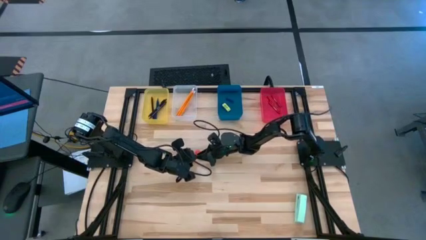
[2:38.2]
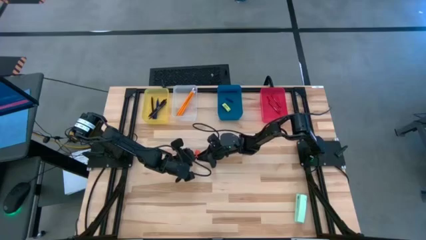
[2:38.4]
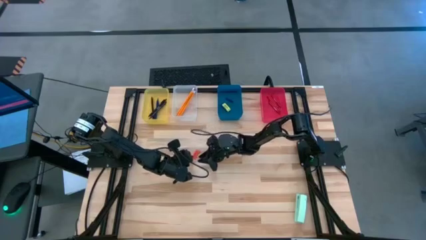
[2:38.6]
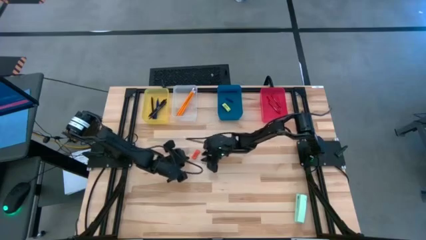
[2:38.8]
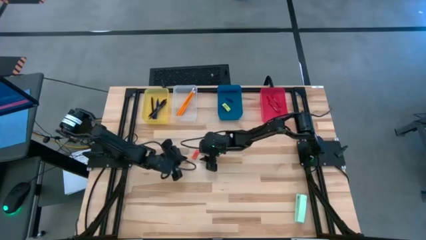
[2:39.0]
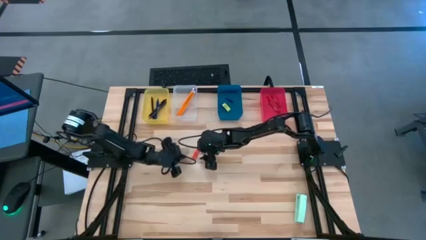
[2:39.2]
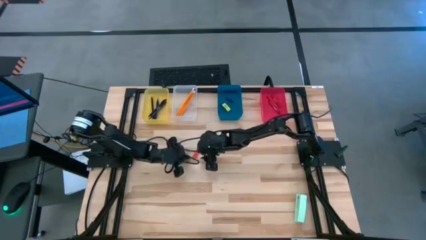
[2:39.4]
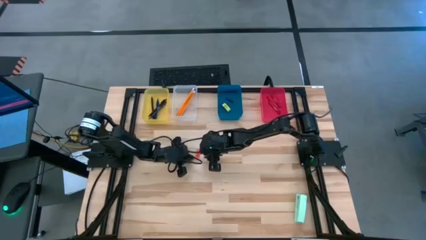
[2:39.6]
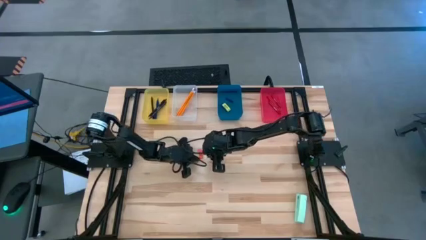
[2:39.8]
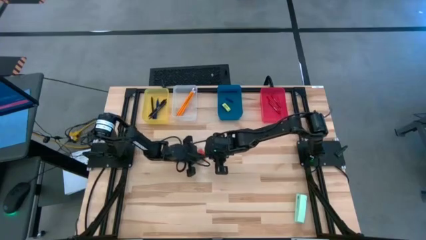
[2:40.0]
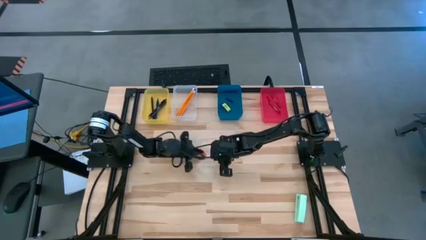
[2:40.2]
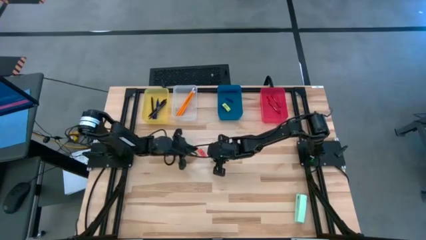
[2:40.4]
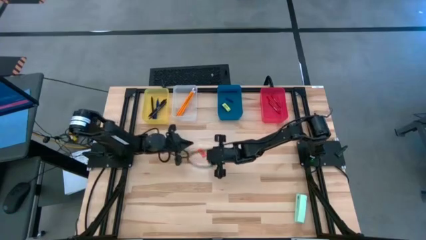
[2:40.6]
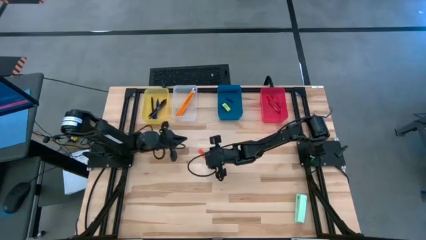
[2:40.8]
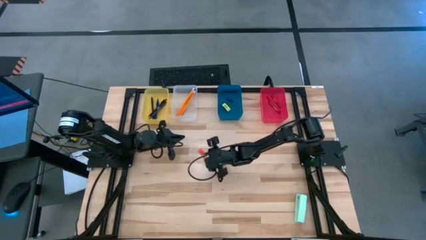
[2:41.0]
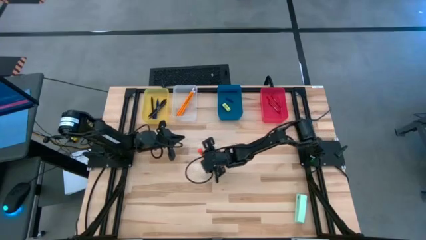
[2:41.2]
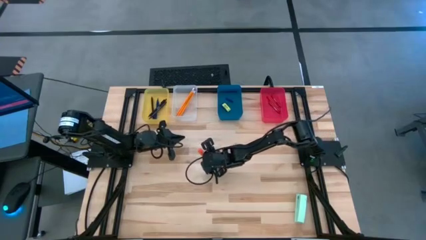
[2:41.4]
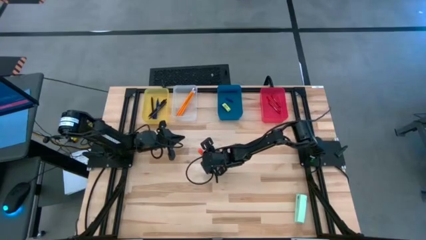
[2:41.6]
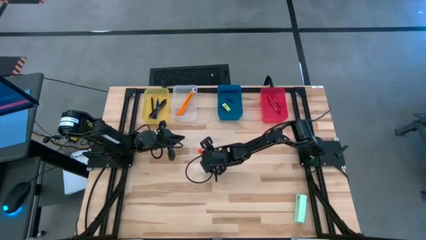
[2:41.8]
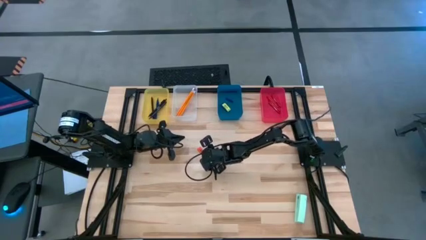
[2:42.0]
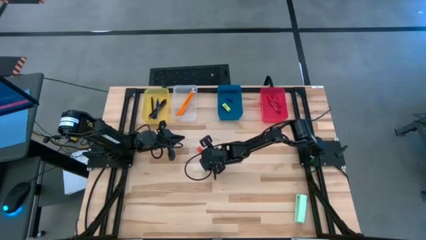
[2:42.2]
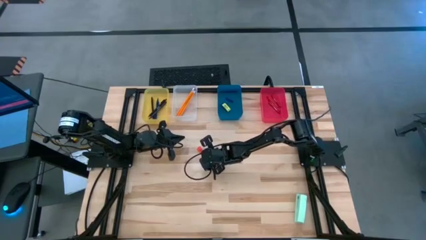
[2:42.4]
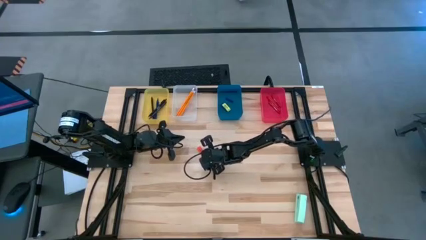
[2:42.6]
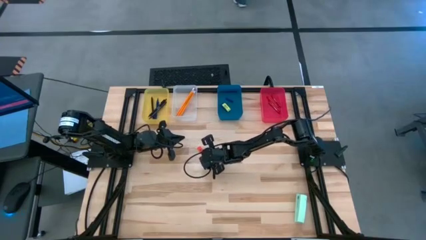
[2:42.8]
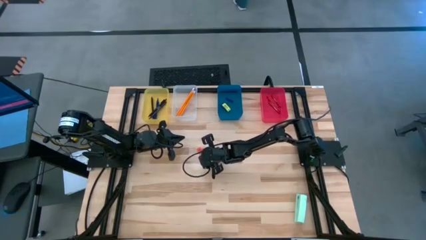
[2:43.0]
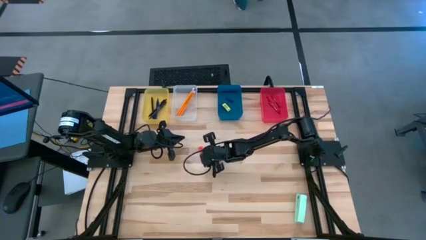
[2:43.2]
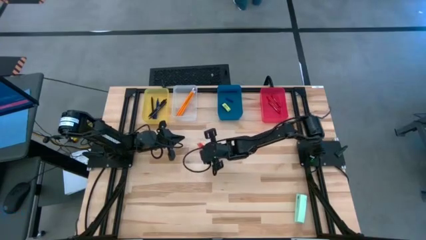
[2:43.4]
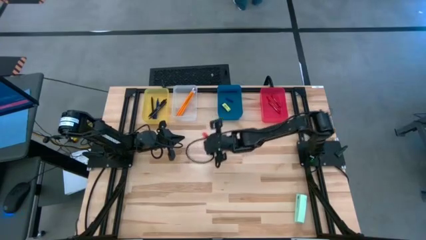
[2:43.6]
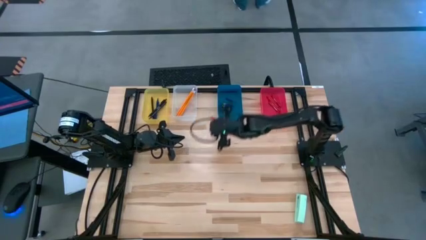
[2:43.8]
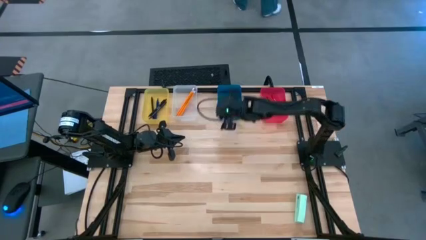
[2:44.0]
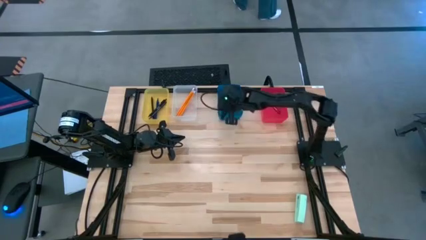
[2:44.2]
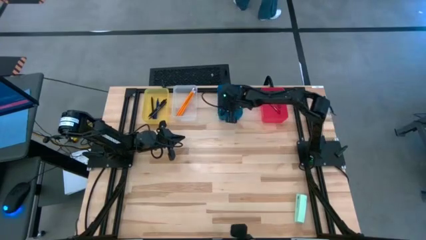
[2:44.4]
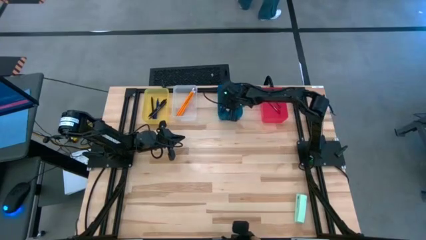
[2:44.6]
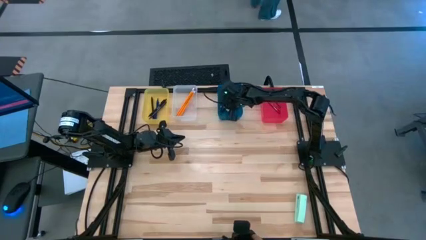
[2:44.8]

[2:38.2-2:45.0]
Task: Sort crayons/erasers/pens/pencils in bins
Put the orange eraser into the blue bin

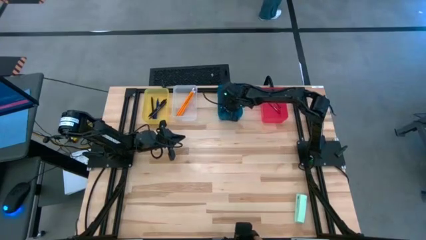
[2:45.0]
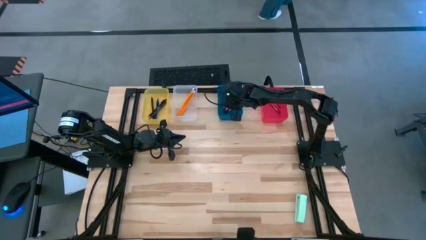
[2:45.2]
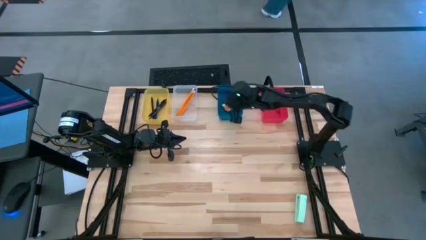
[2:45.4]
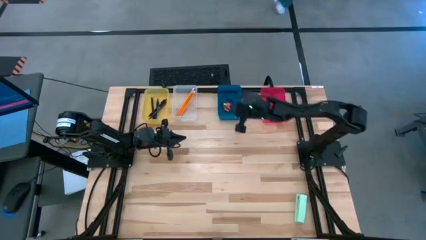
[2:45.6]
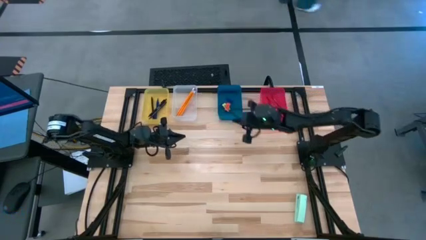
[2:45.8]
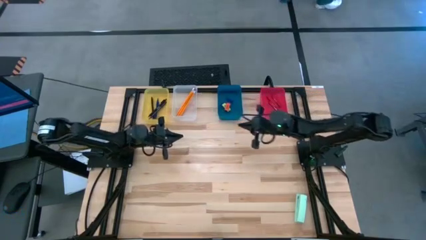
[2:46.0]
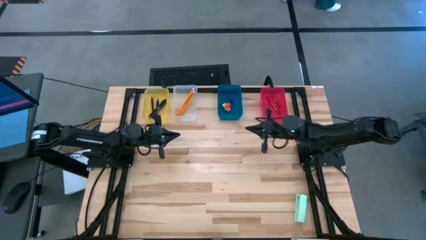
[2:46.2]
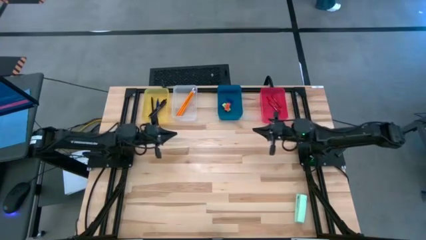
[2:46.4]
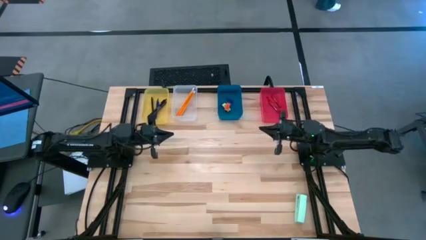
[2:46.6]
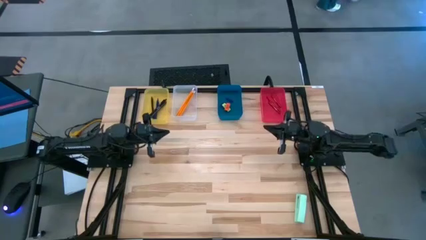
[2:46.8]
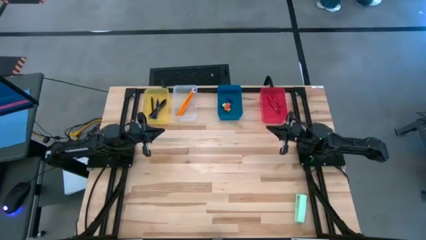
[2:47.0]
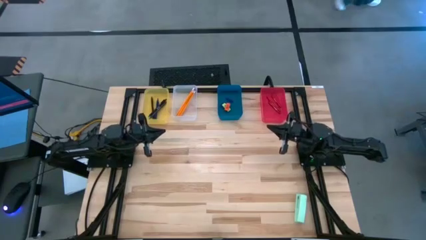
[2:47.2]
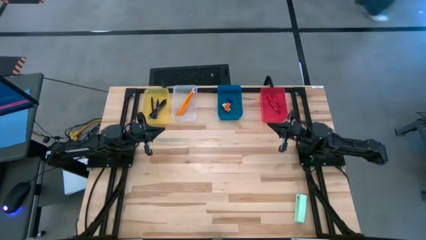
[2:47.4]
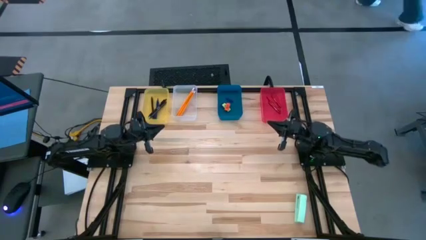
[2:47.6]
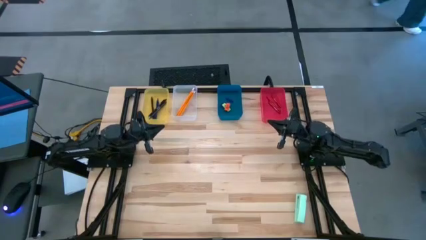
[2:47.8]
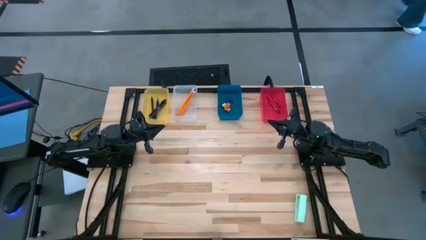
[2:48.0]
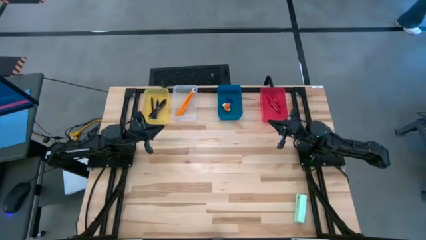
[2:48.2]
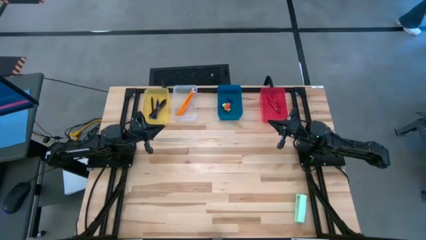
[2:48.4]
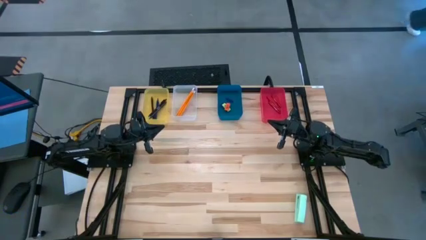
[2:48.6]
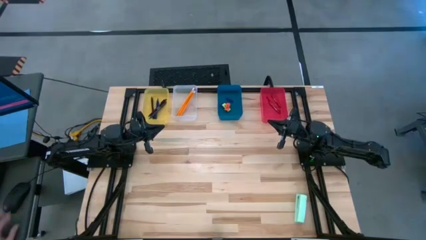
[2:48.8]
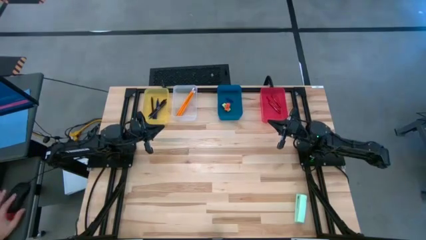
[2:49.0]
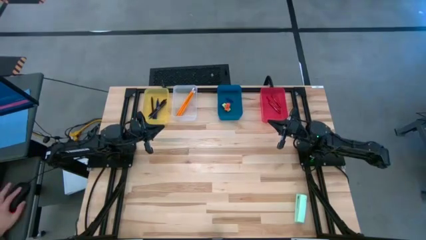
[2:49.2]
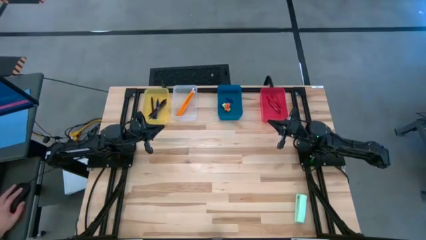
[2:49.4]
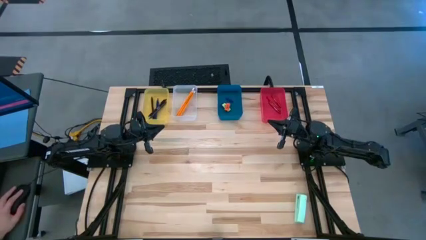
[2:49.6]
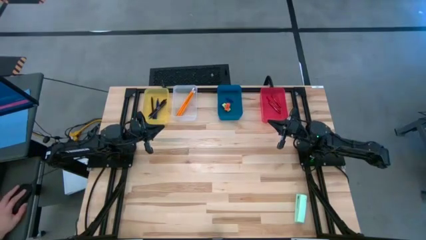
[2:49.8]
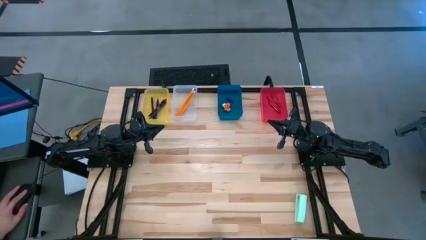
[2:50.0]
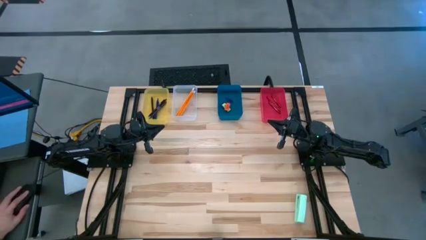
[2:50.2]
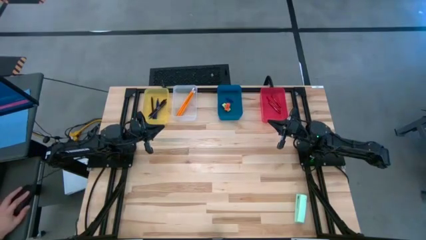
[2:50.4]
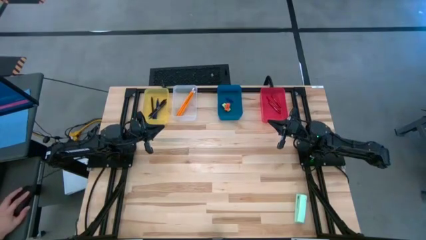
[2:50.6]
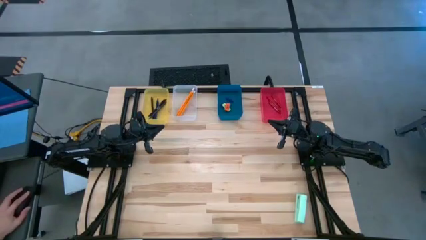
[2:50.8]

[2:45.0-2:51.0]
Return to Home Position

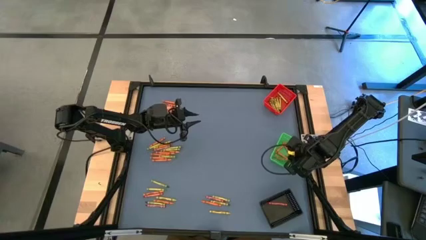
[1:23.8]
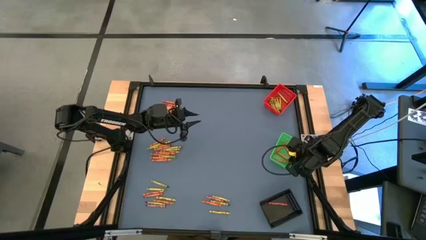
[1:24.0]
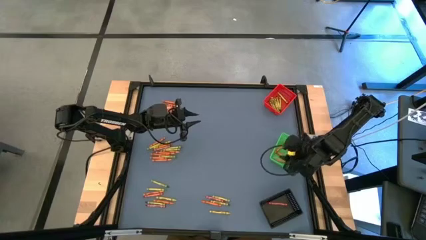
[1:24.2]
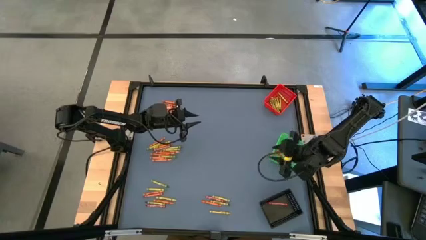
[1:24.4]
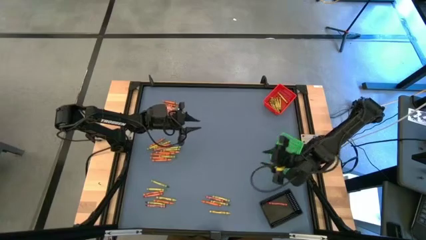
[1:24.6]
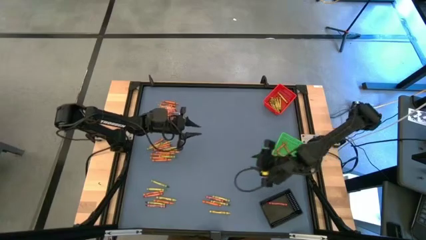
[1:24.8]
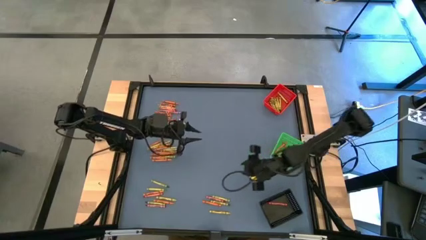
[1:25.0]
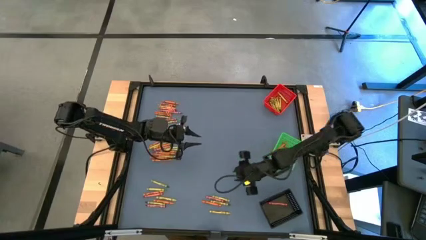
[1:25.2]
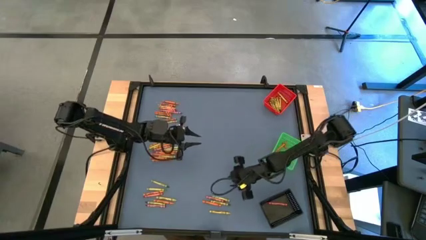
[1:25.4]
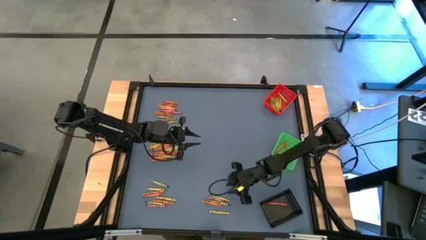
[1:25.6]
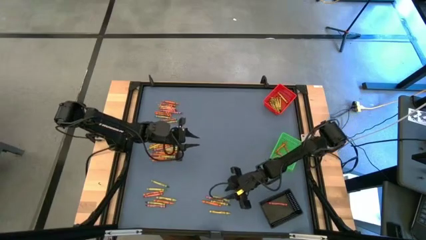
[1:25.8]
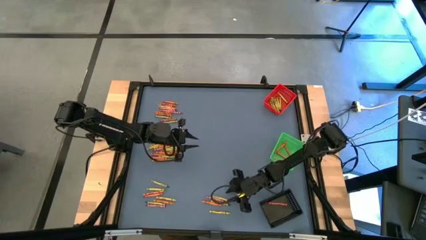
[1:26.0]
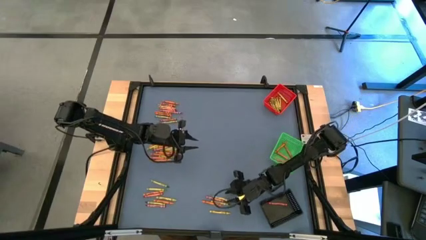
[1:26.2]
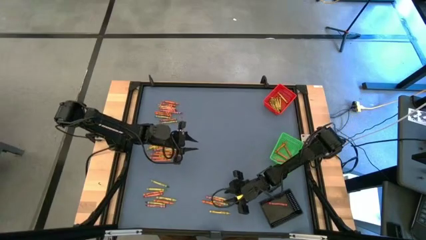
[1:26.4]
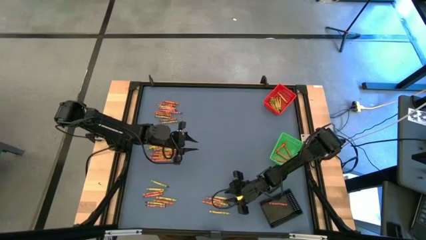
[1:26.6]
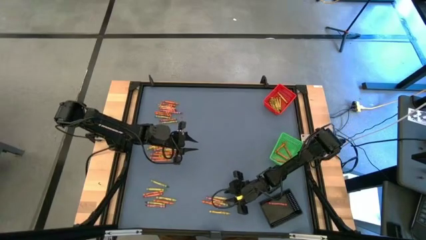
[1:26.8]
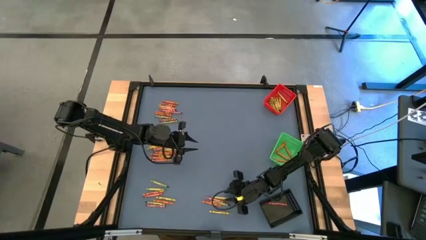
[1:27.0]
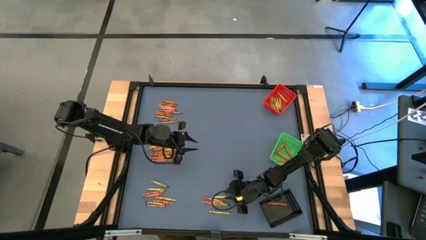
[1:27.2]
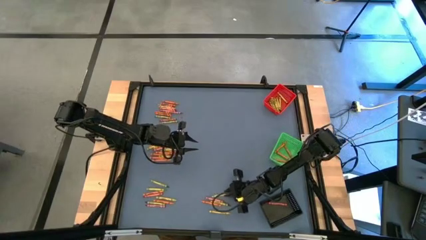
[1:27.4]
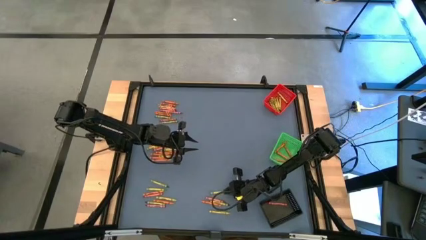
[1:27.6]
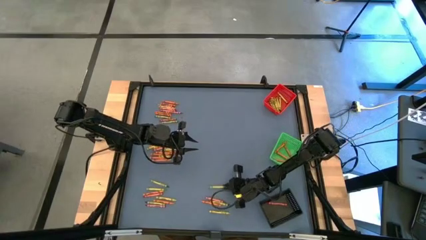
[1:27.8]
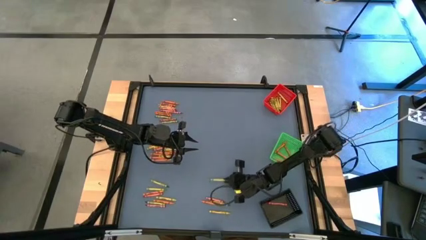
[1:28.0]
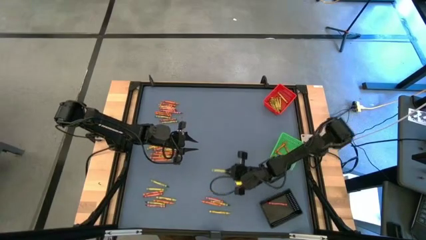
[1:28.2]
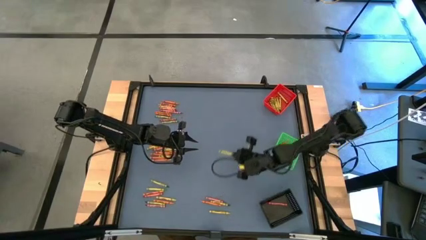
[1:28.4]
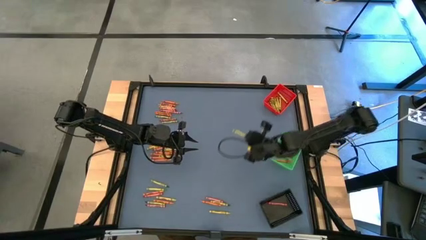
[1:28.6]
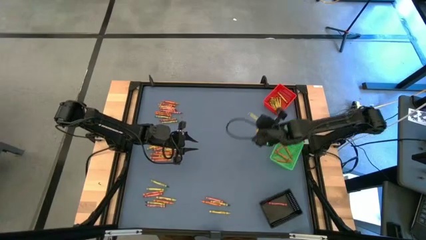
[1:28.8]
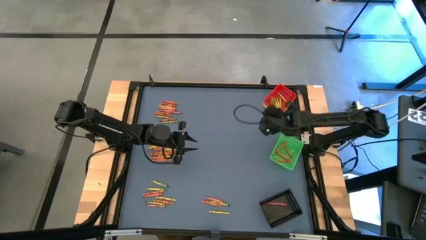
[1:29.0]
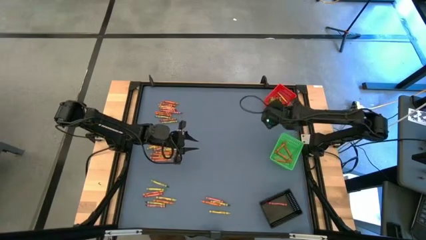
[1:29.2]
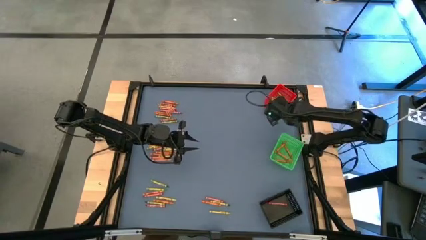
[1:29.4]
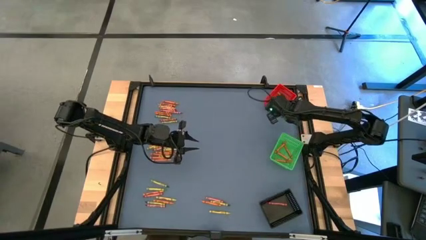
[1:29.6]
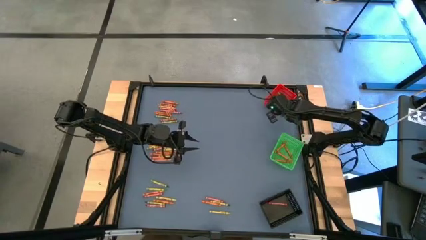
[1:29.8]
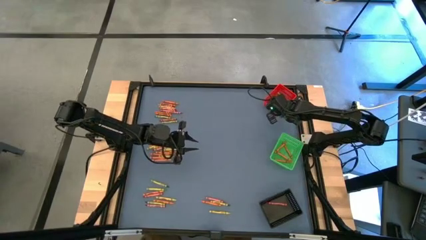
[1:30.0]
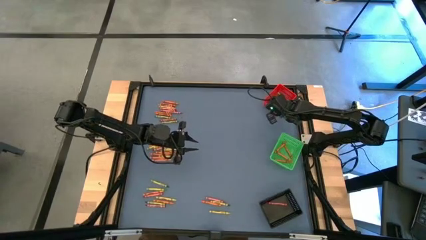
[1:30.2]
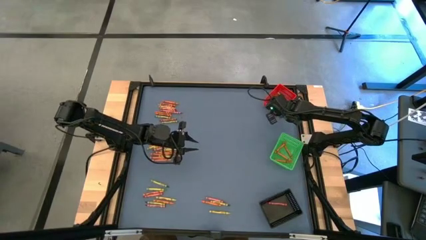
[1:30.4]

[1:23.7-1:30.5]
Task: Sort crayons
Put the green crayon into the red bin
